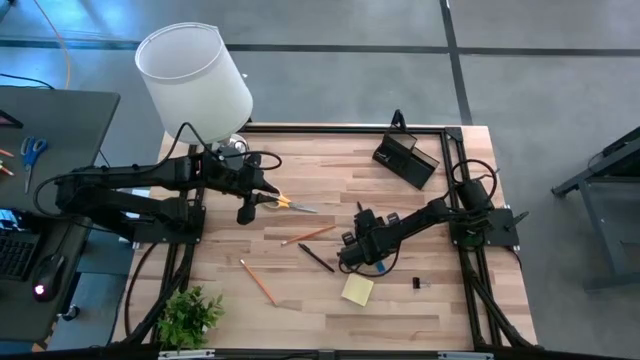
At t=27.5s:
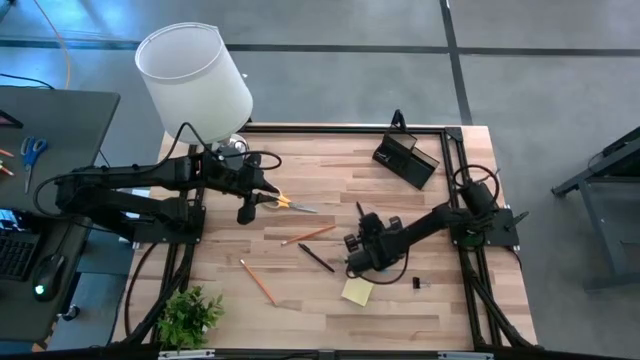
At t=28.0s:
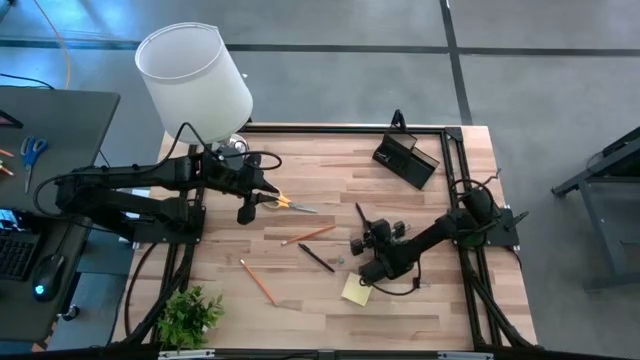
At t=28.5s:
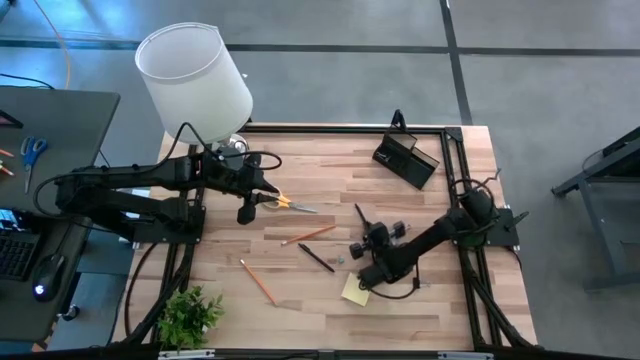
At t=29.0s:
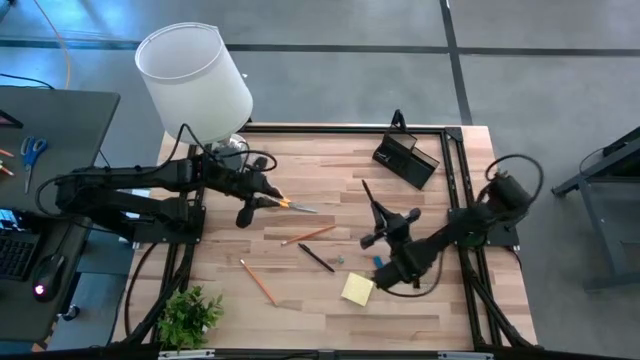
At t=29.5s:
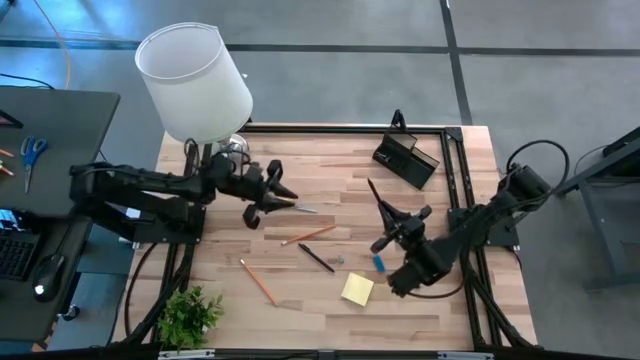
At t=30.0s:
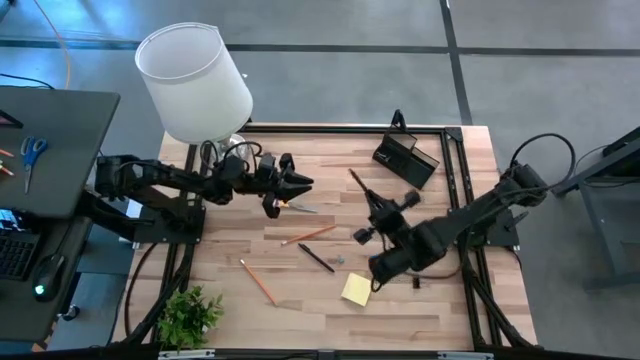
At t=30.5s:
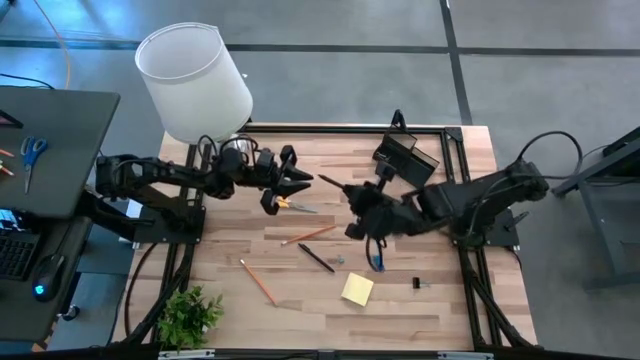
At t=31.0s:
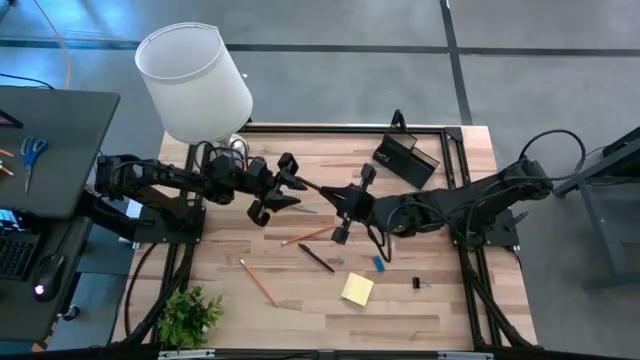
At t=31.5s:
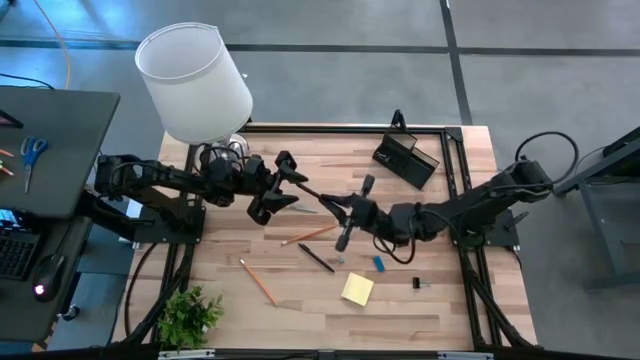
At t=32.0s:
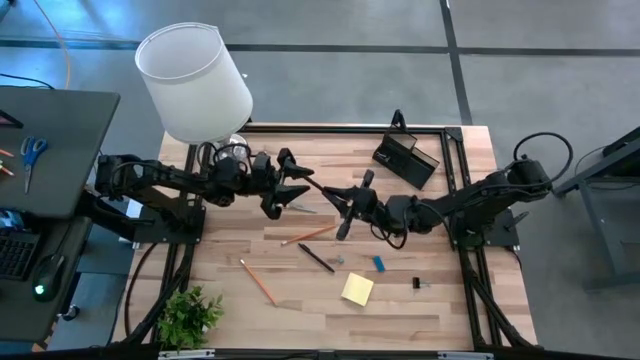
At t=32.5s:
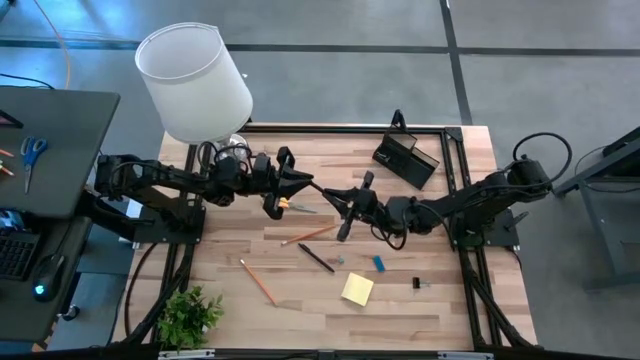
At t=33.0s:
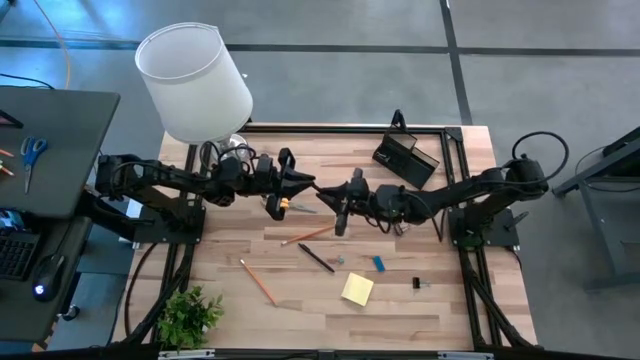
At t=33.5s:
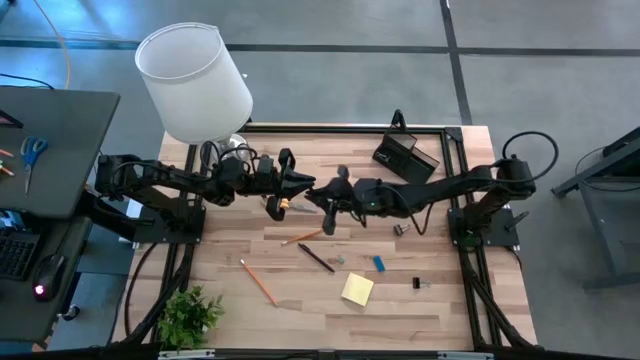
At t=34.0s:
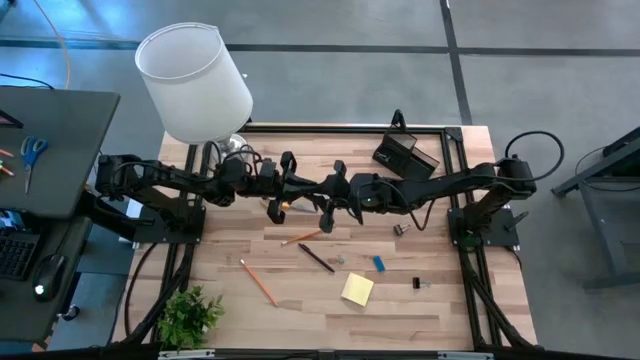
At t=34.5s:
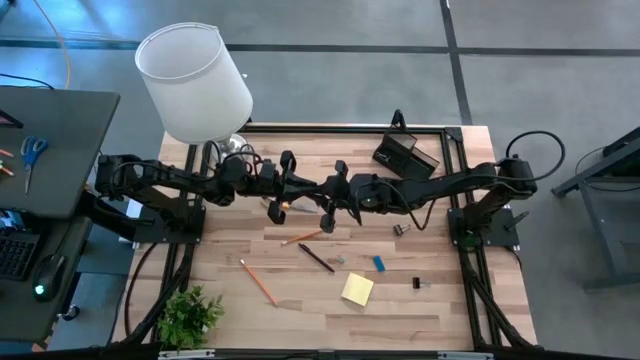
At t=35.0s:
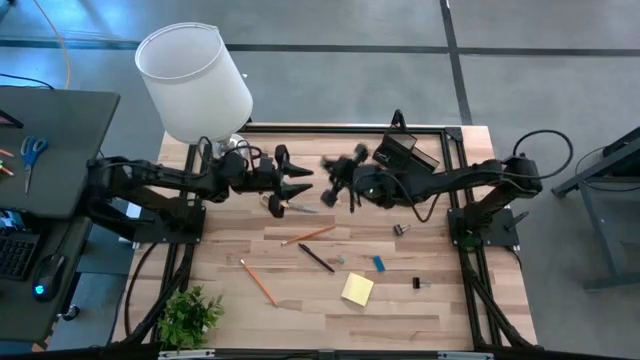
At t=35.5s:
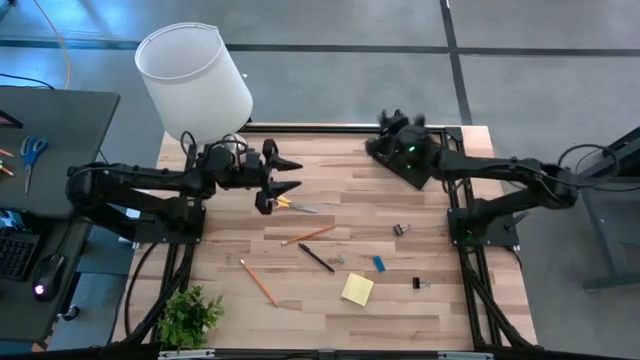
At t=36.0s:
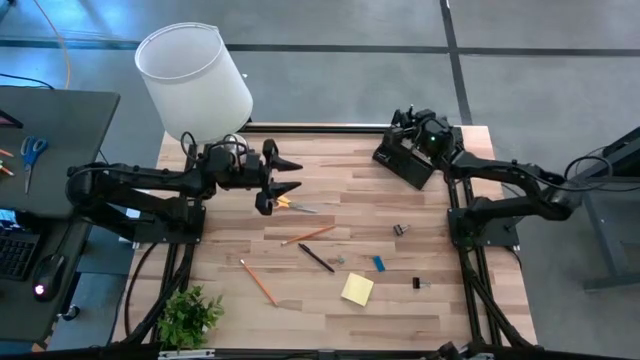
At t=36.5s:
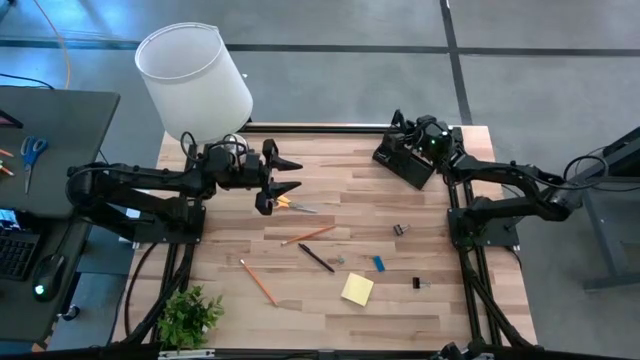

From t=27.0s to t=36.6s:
Task: Pick and place office supplies into organizer
Put the top black pen into the mesh desk organizer

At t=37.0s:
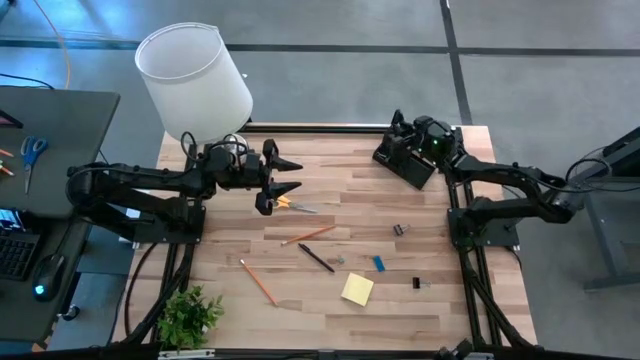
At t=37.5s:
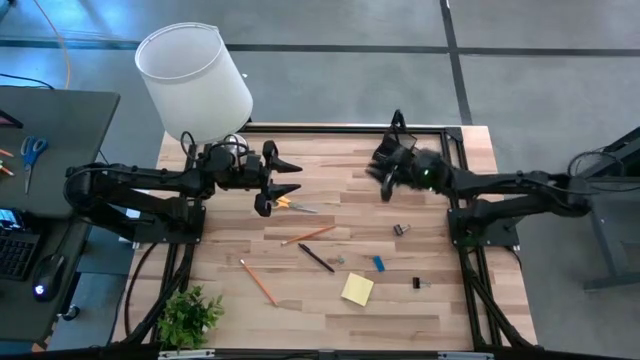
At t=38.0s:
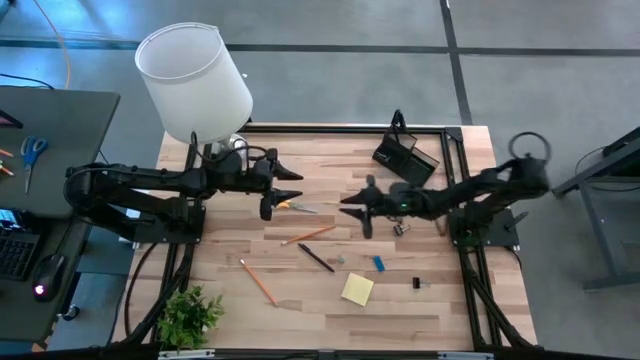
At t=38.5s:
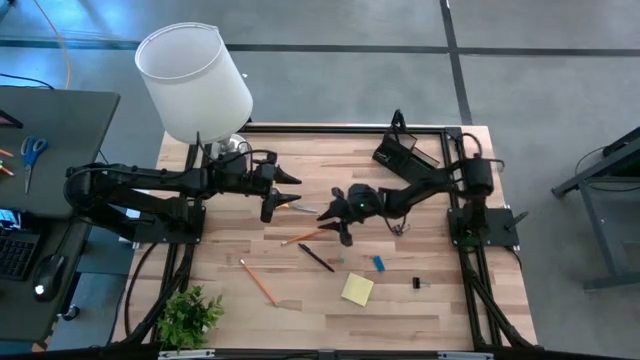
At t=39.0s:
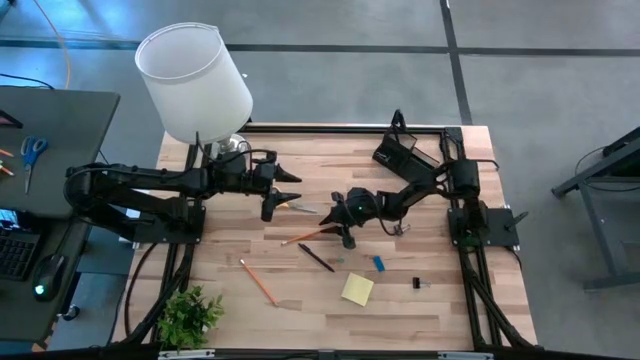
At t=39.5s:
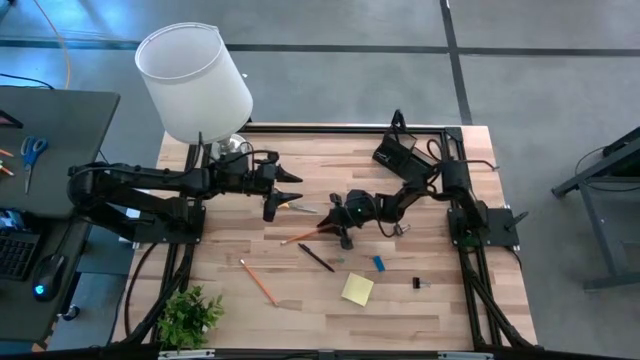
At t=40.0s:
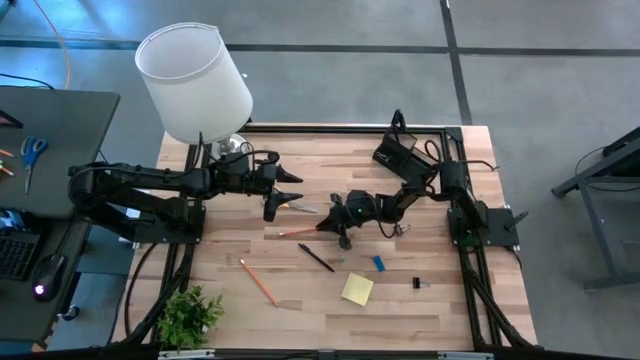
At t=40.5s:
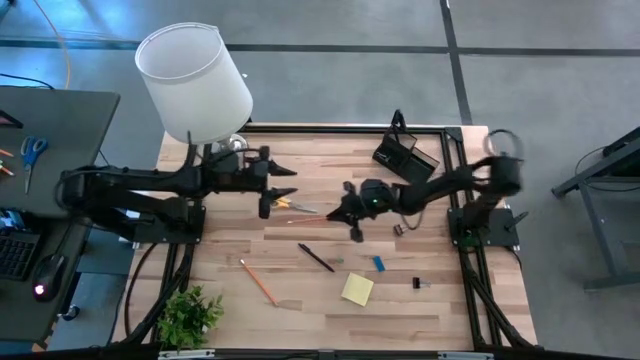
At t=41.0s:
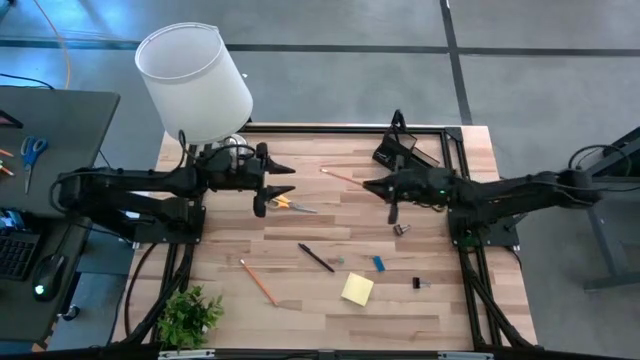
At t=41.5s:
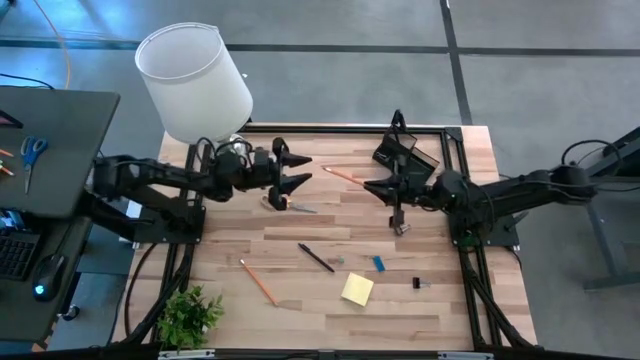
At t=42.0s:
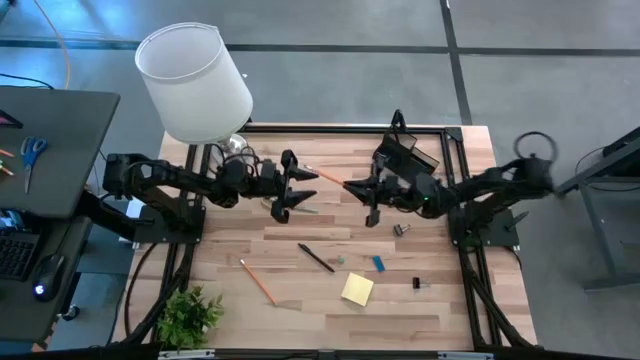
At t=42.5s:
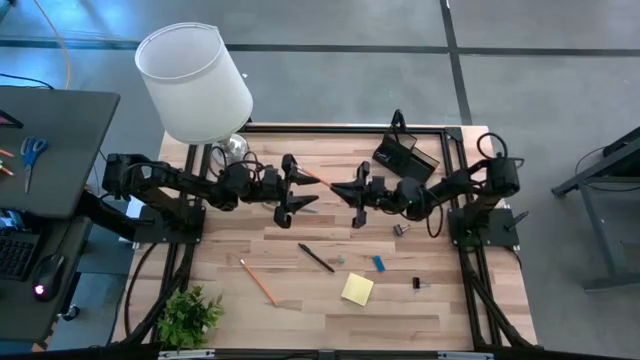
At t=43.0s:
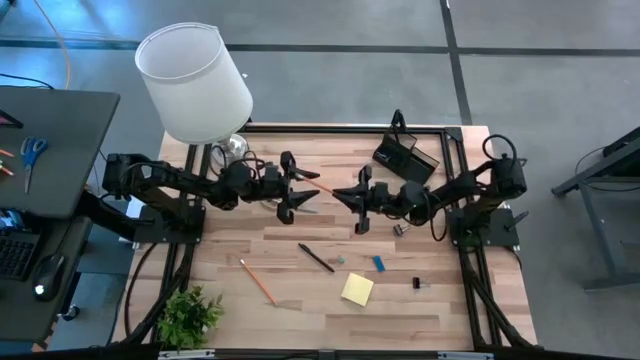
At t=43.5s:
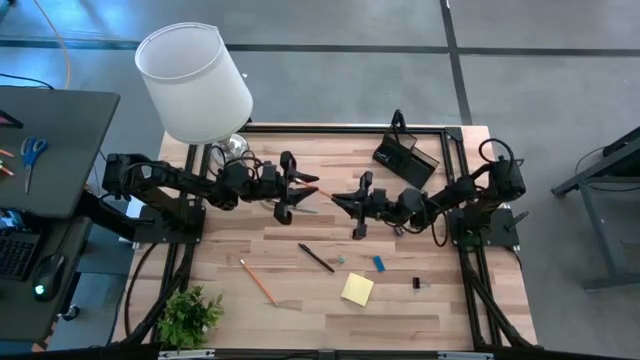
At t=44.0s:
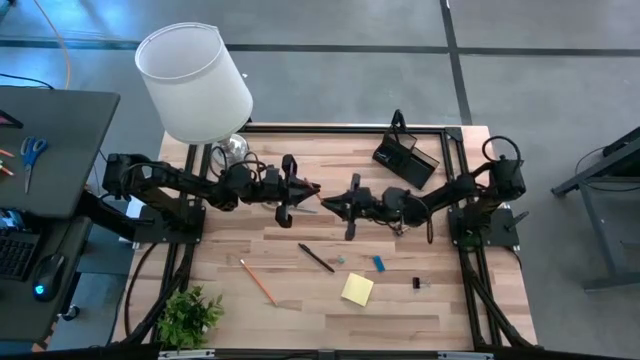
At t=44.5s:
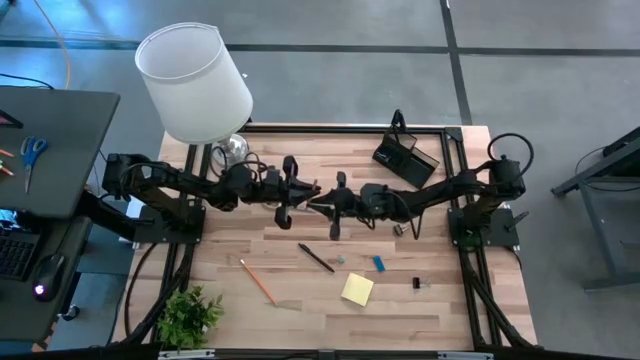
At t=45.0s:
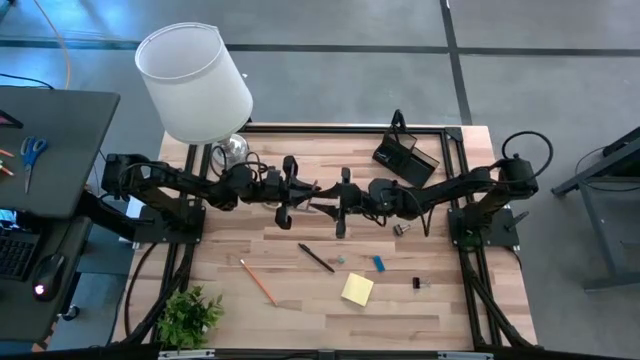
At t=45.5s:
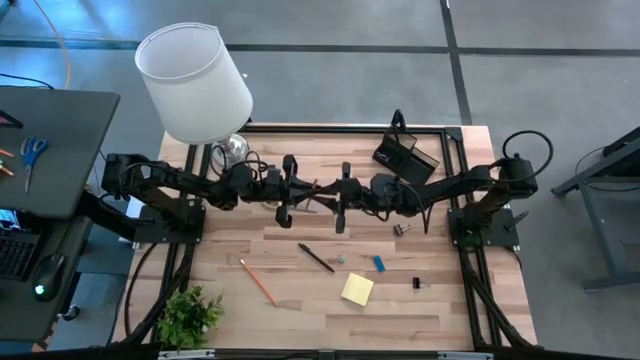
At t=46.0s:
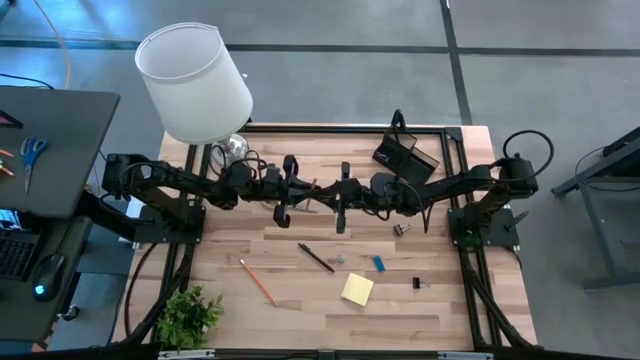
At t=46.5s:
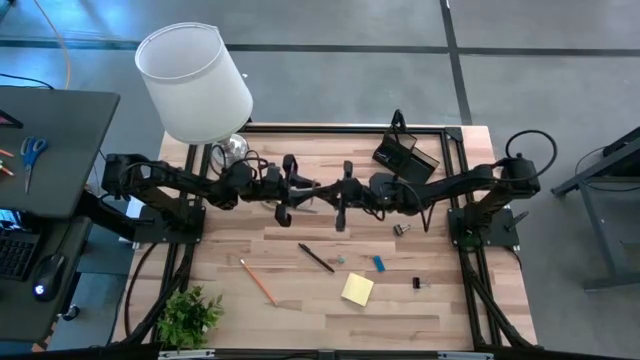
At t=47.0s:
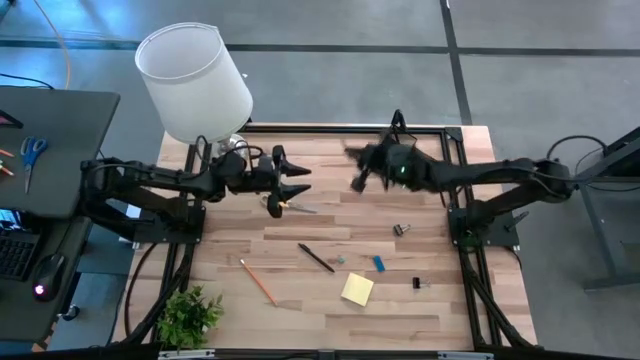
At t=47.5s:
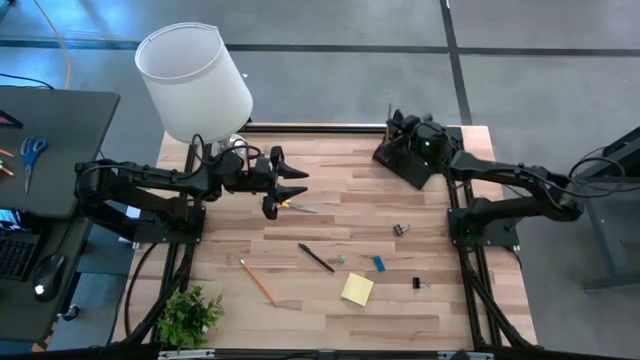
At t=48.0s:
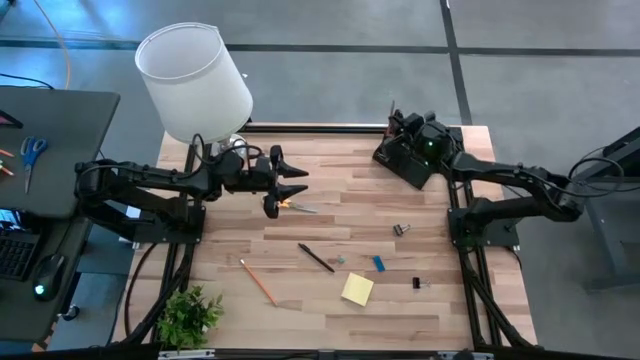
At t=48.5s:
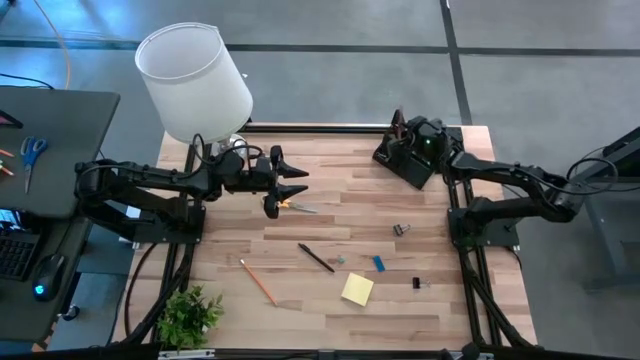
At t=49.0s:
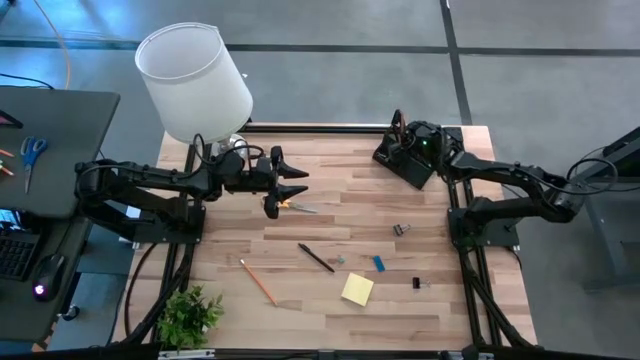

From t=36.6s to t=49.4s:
Put the top orange pencil into the mesh desk organizer
